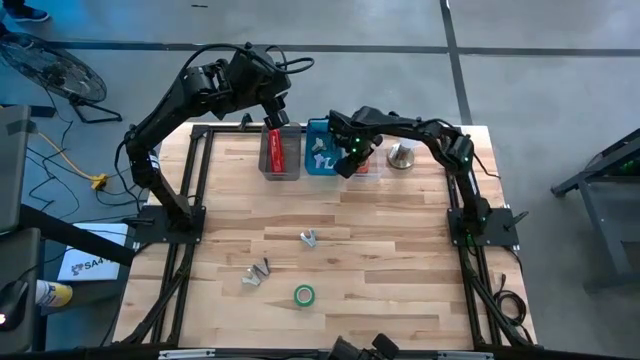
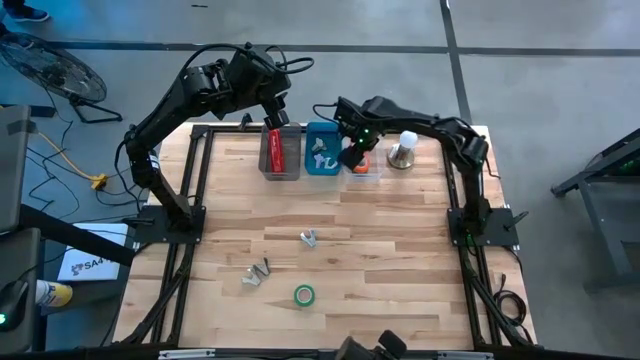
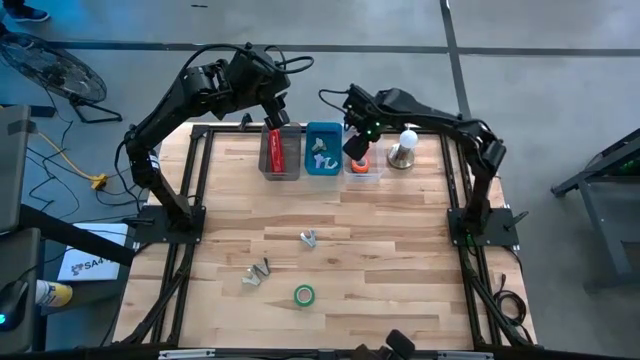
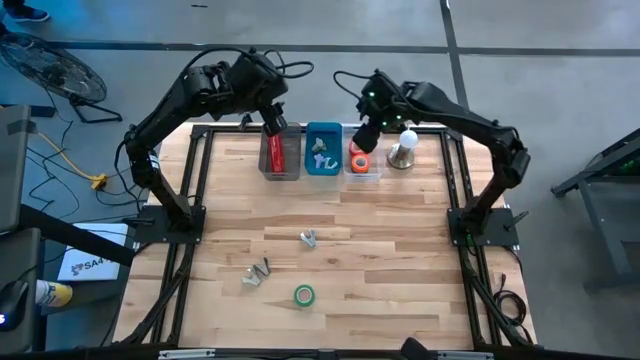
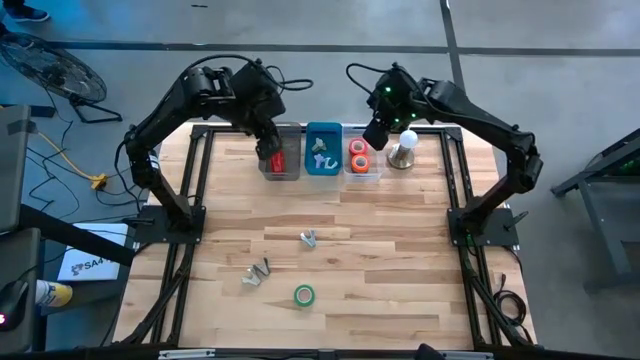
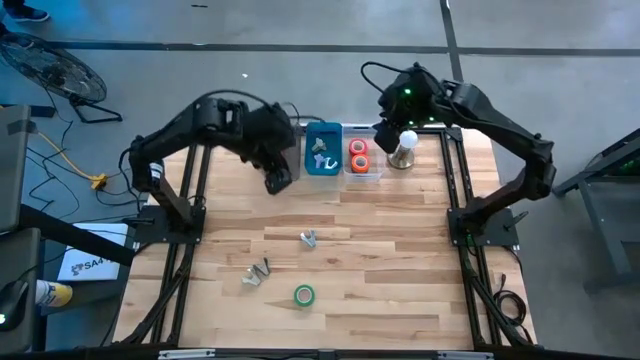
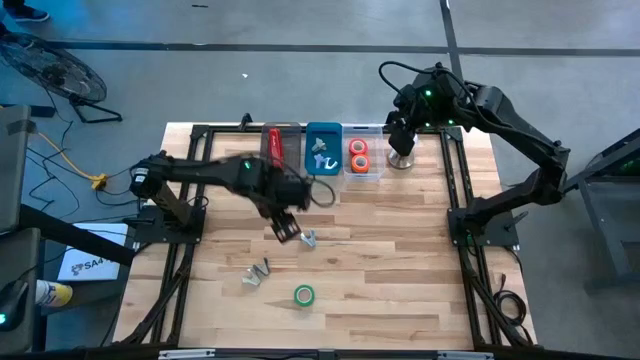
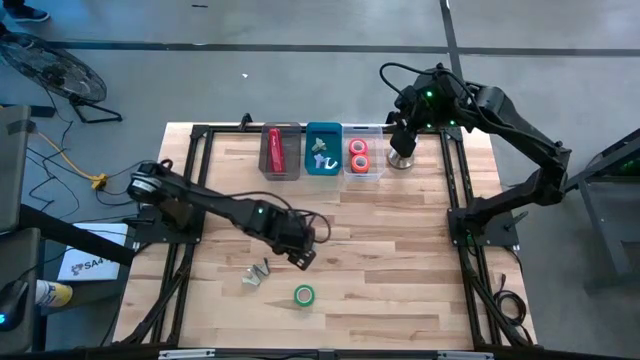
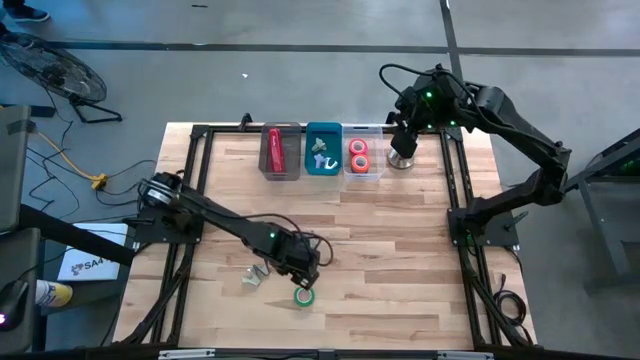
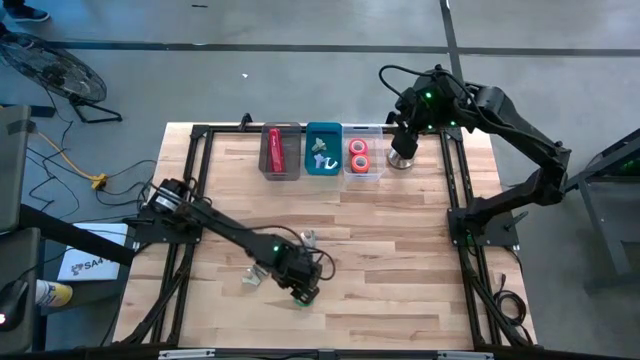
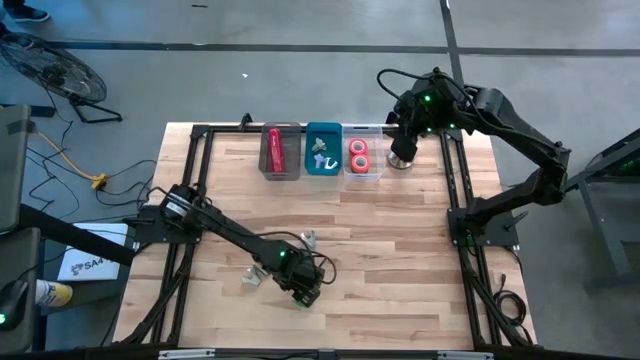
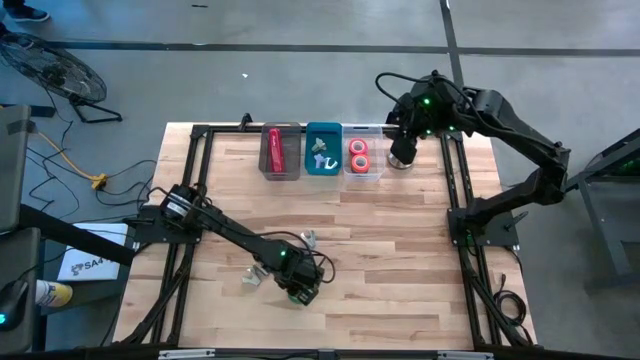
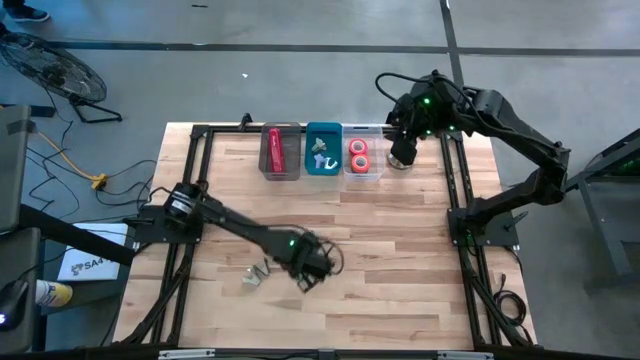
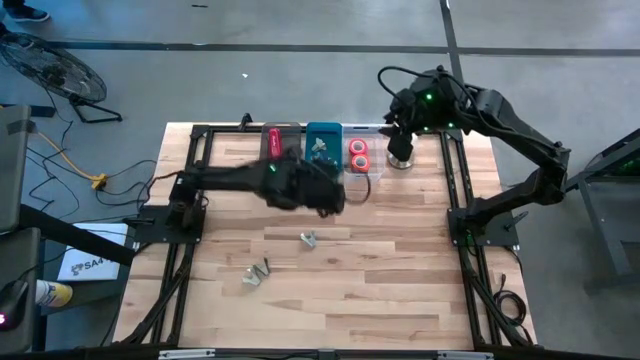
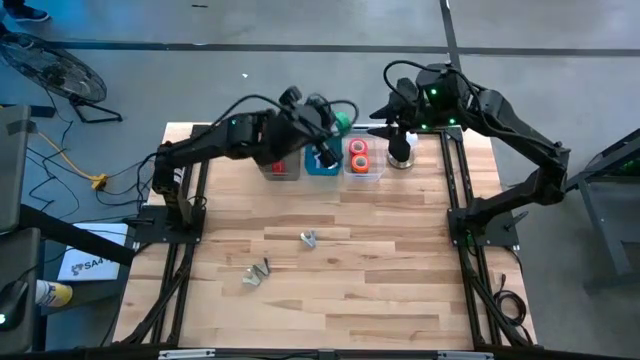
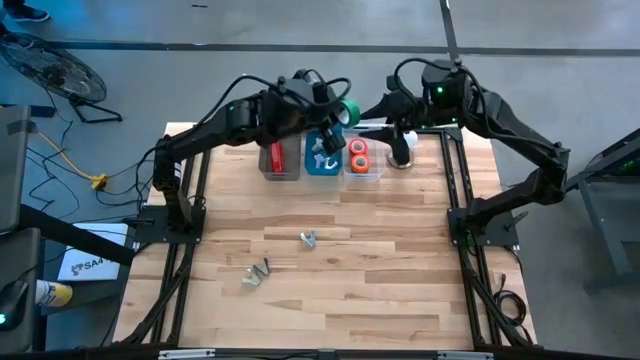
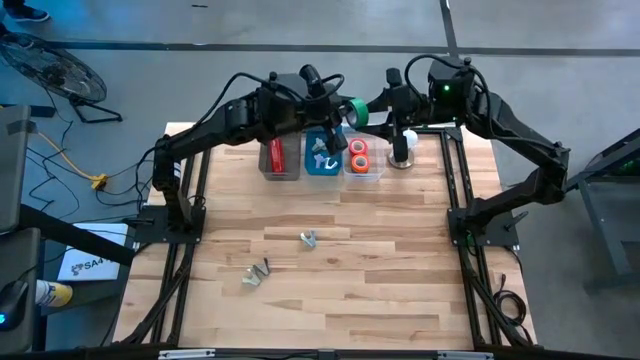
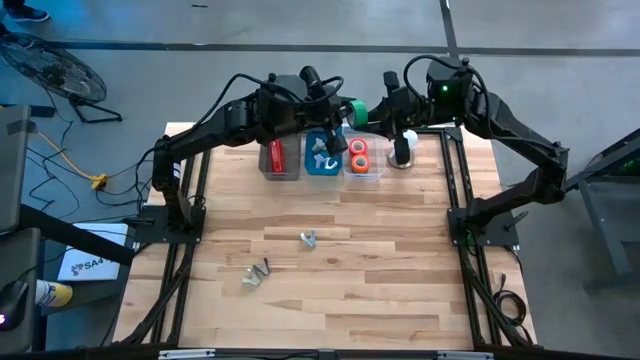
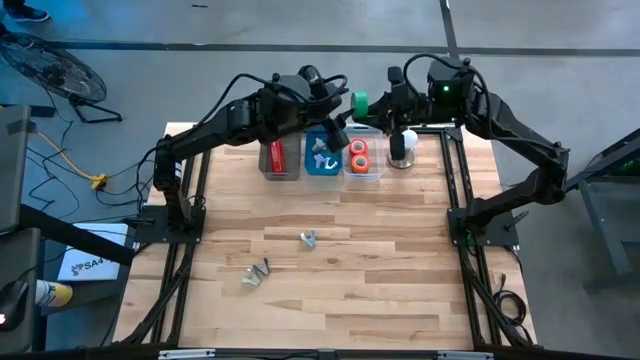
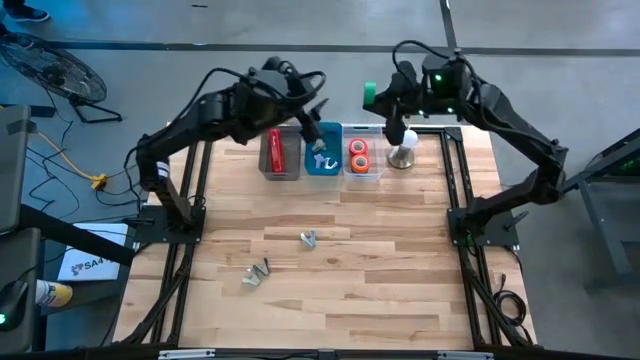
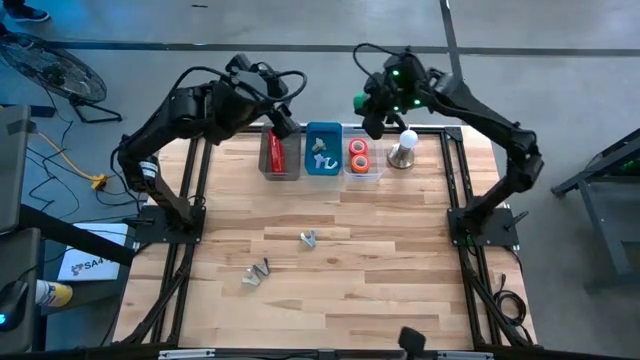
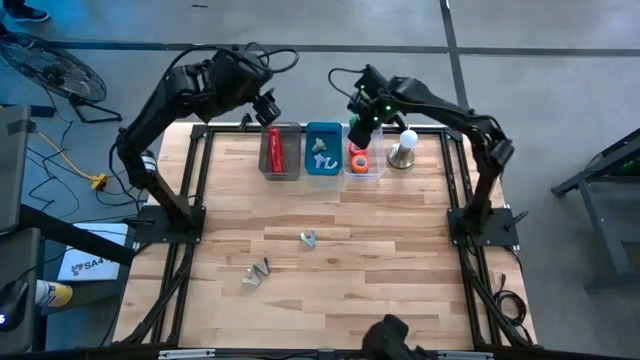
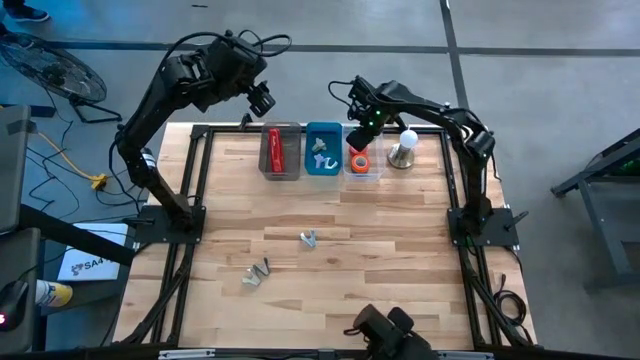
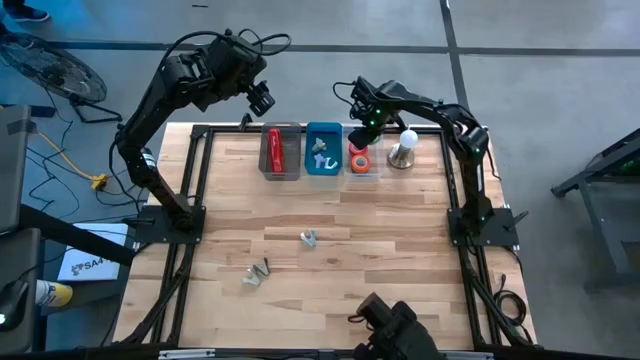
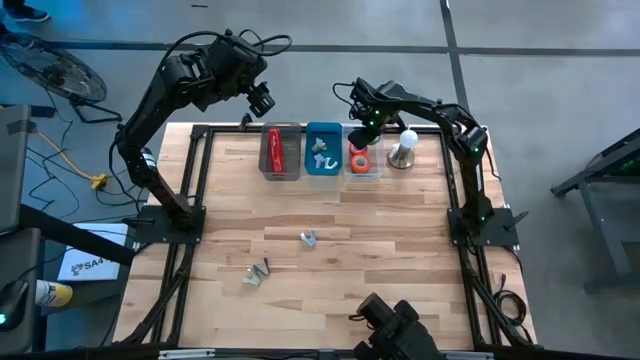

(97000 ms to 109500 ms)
Task: Pick and place Stapler, Stapler remover, tape
Put the green tape into the transparent bin

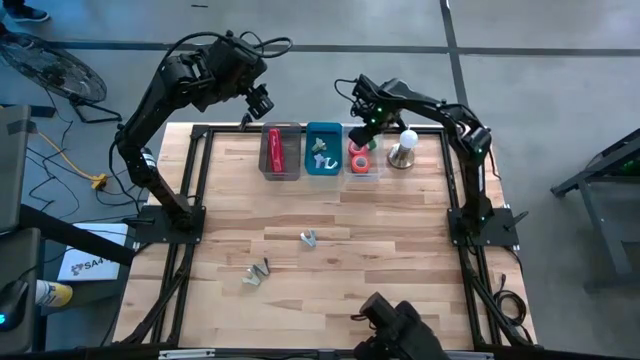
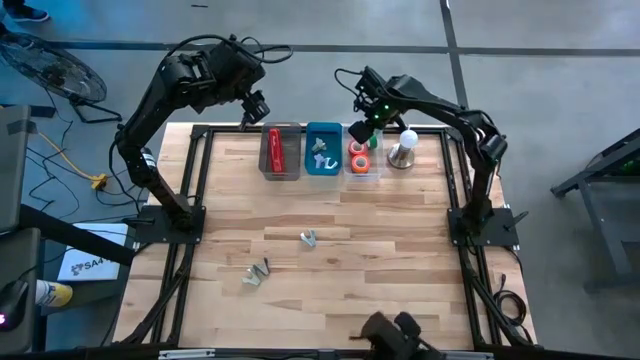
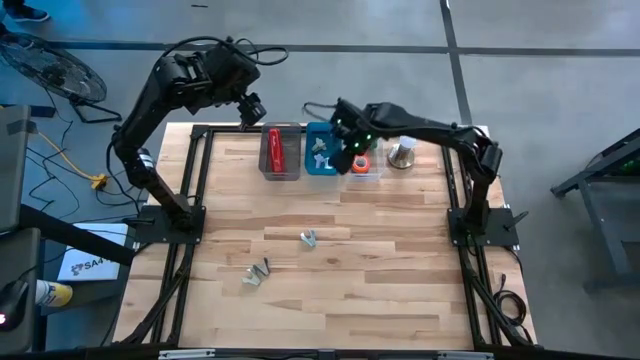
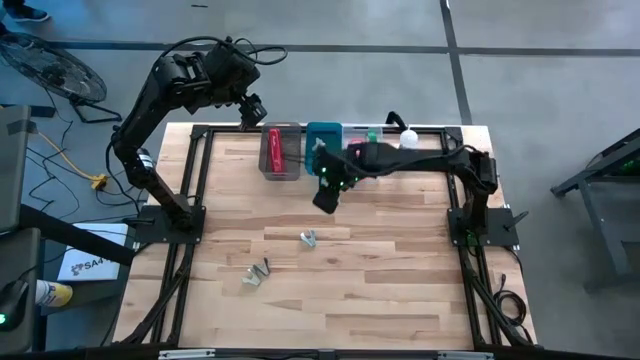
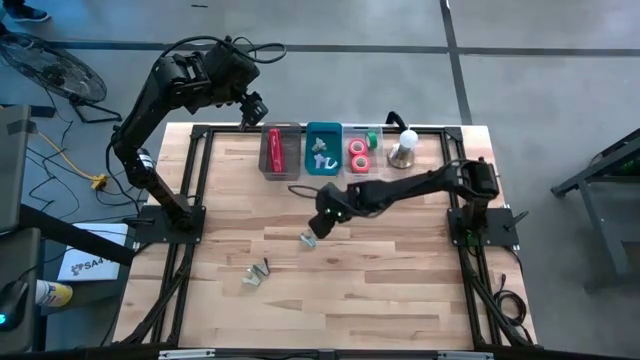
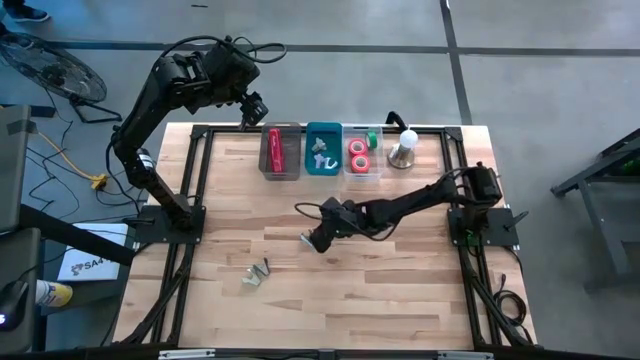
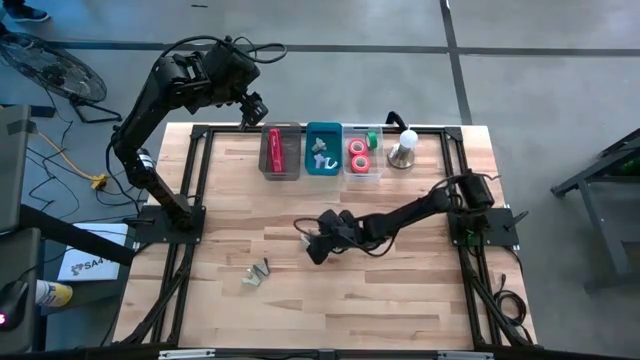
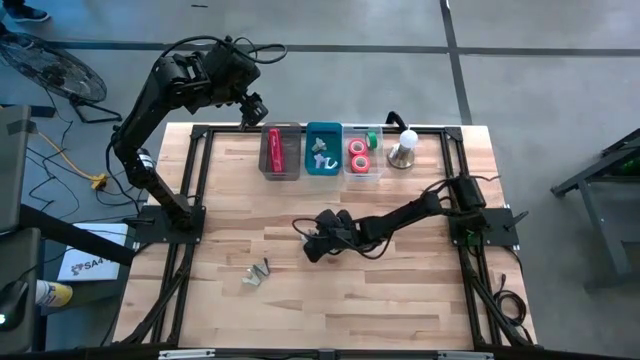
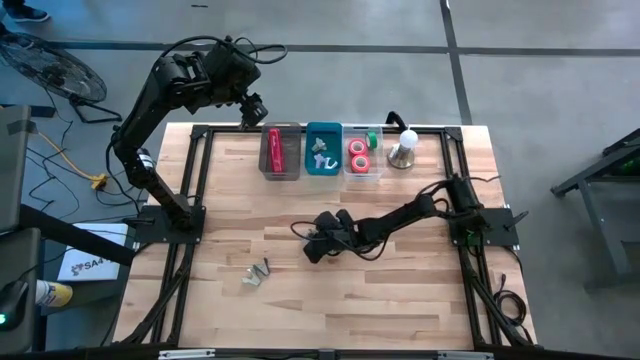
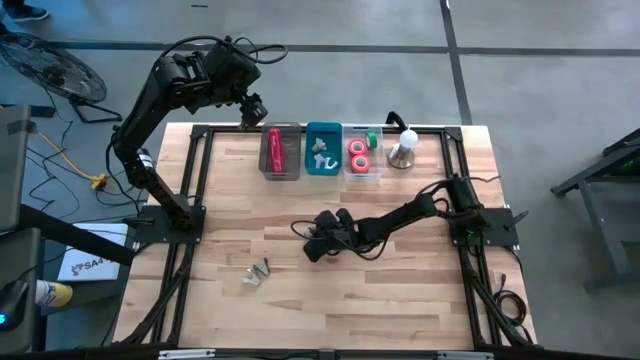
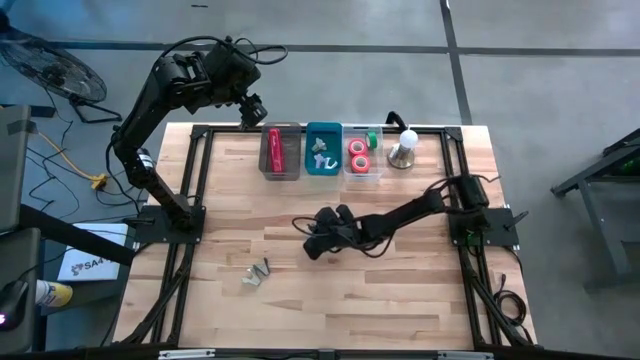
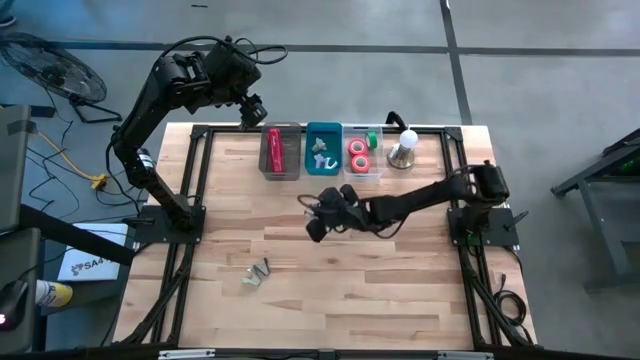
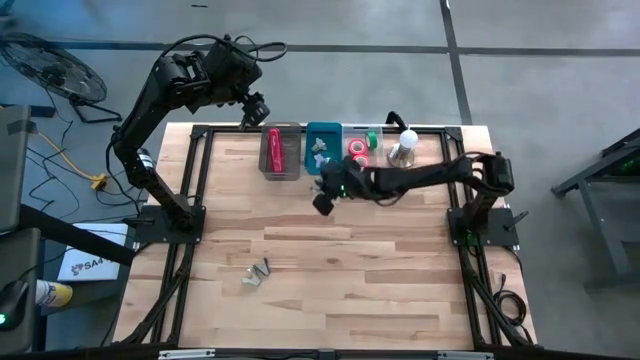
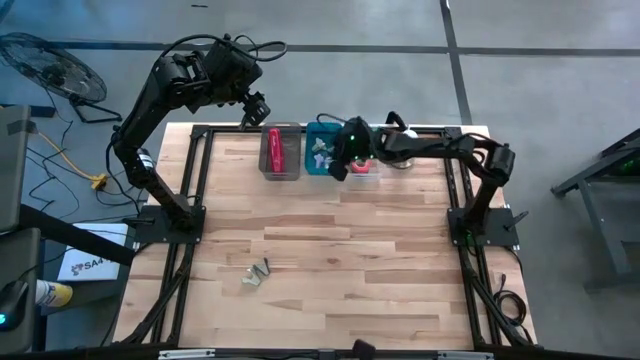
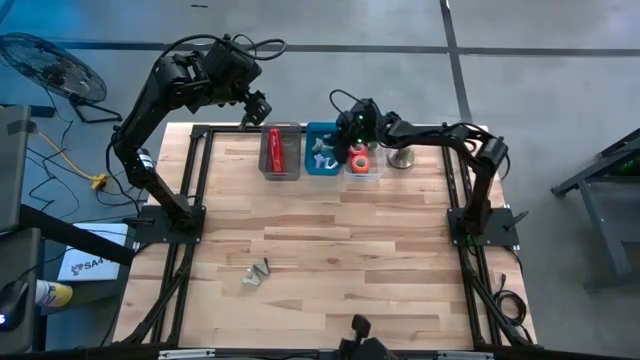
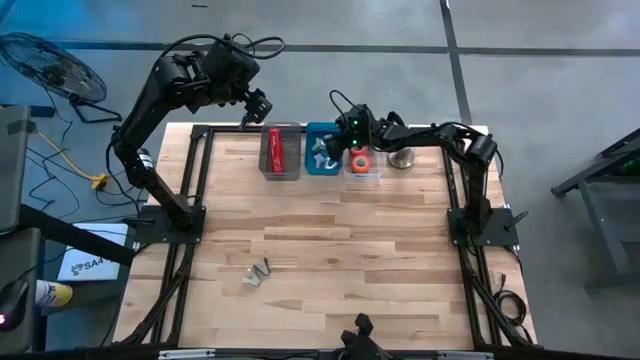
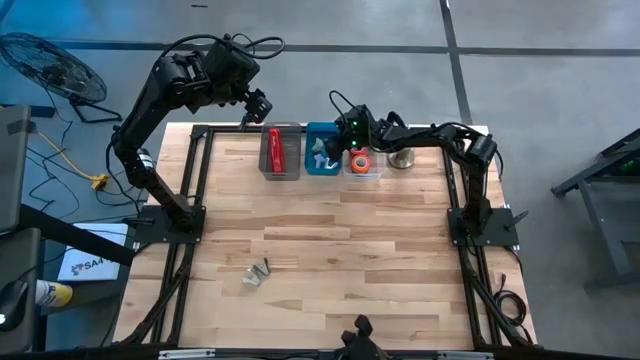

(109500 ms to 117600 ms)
Put the blue staple remover into the blue bin
